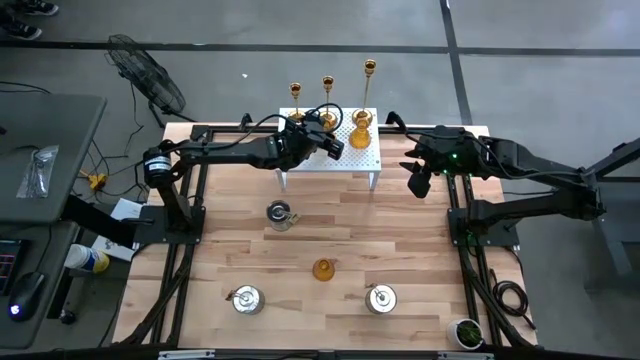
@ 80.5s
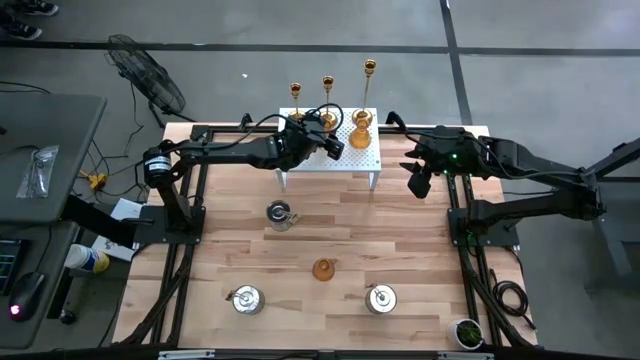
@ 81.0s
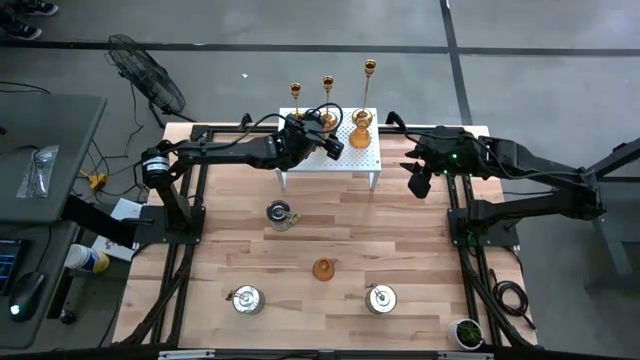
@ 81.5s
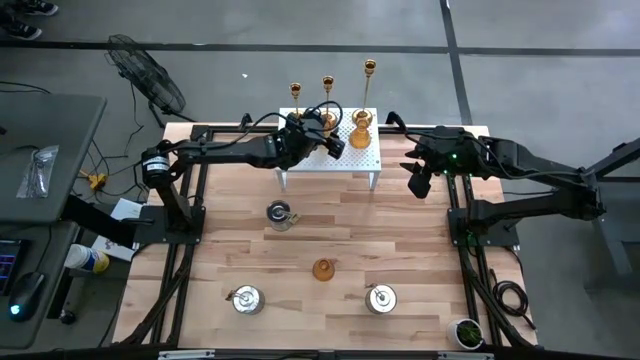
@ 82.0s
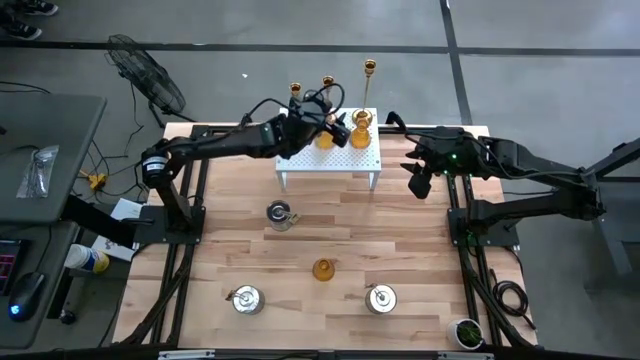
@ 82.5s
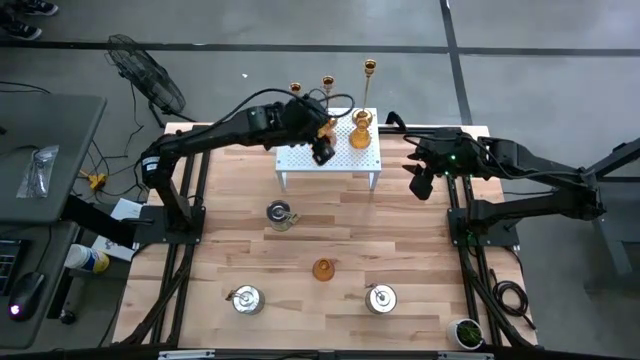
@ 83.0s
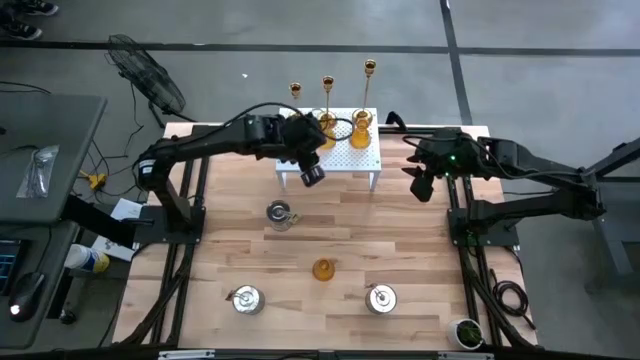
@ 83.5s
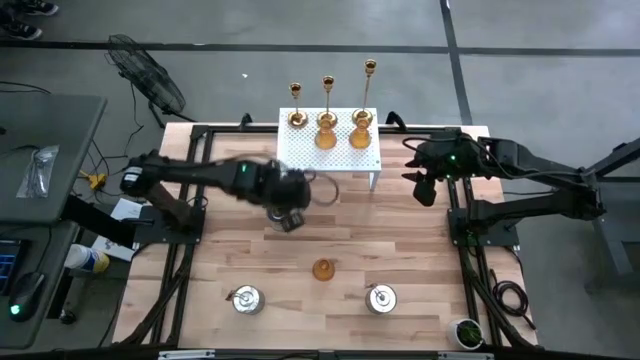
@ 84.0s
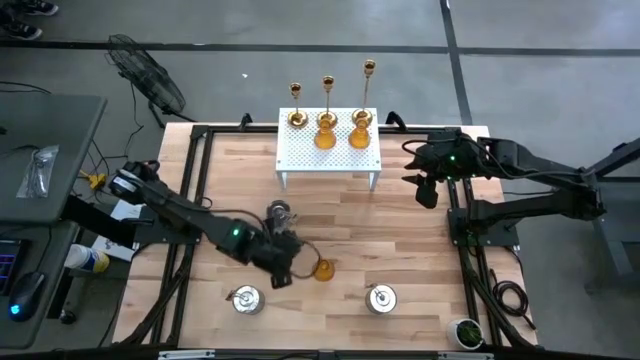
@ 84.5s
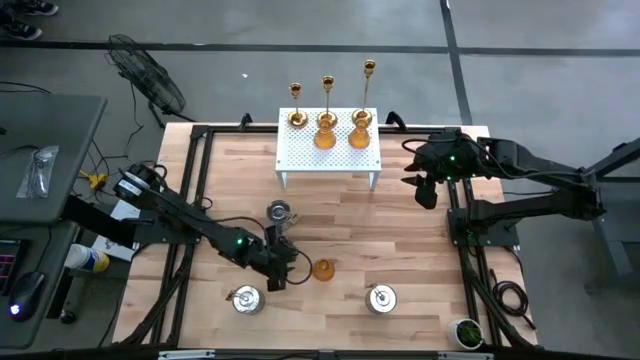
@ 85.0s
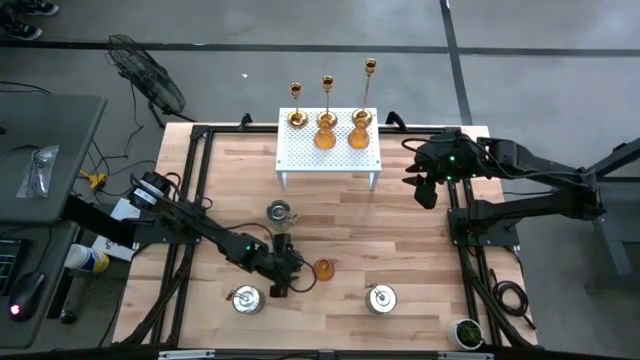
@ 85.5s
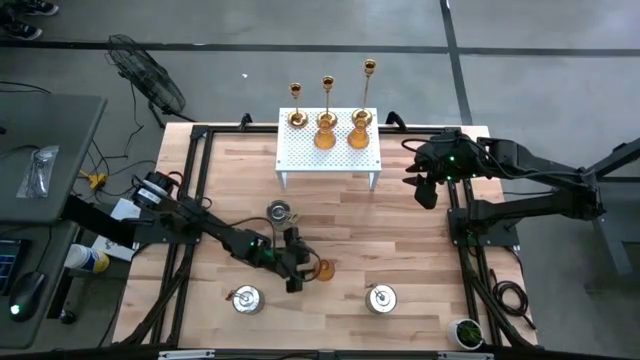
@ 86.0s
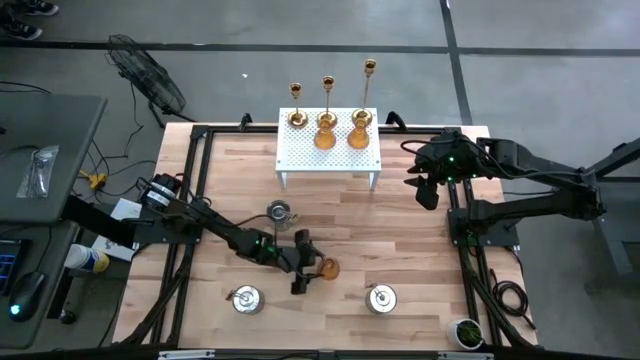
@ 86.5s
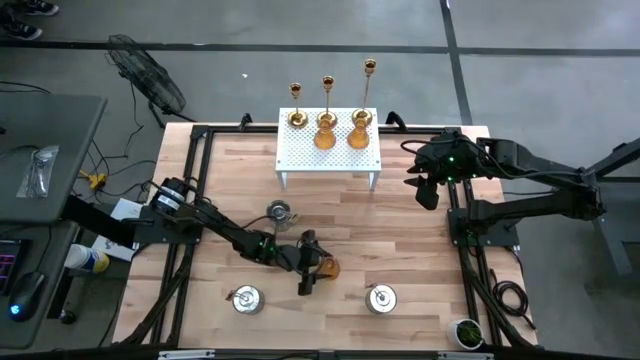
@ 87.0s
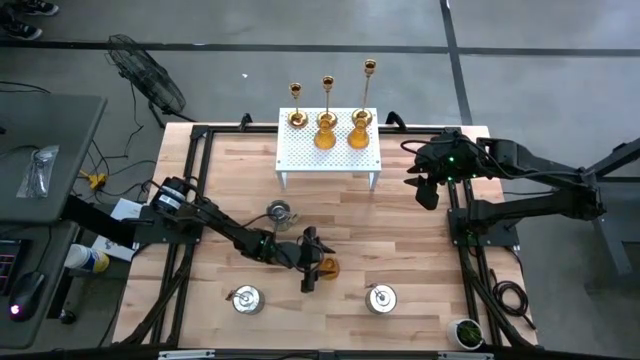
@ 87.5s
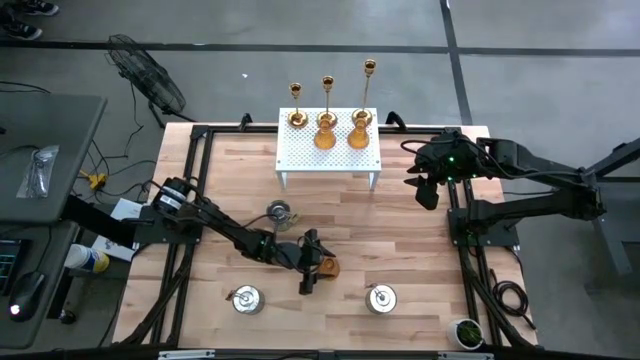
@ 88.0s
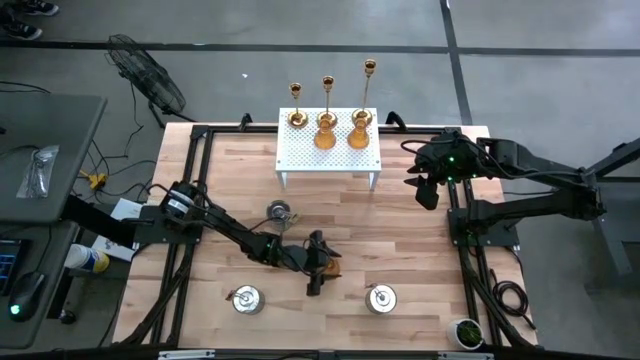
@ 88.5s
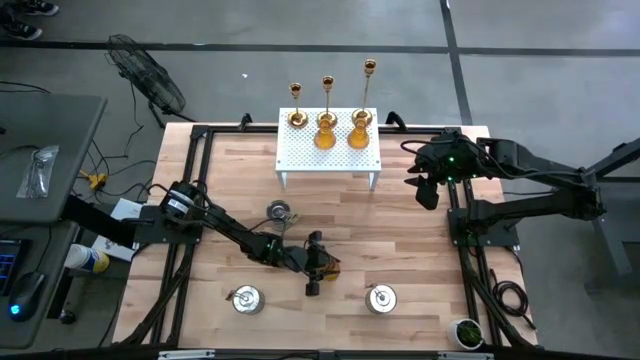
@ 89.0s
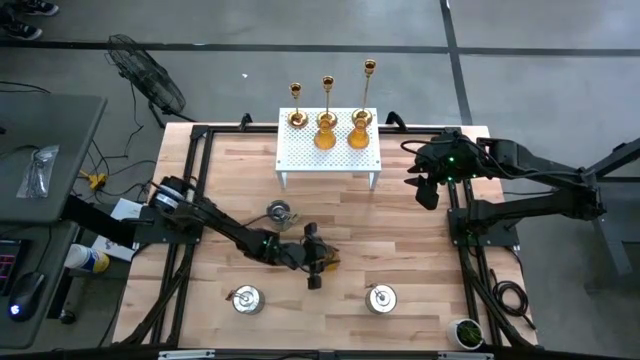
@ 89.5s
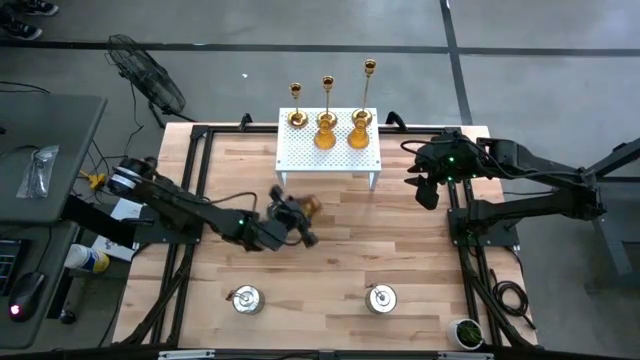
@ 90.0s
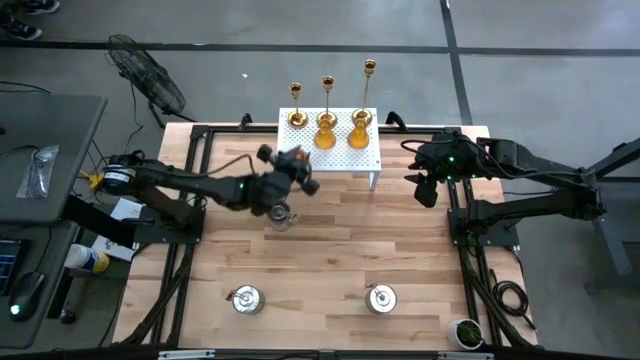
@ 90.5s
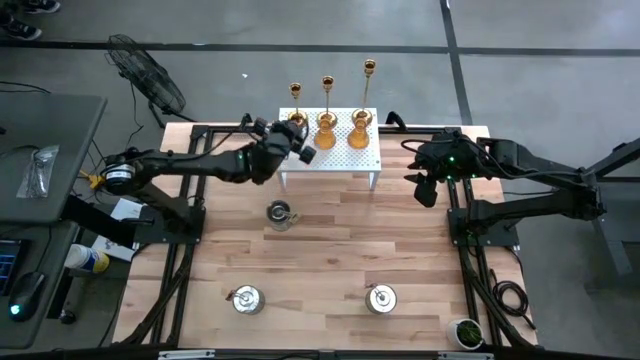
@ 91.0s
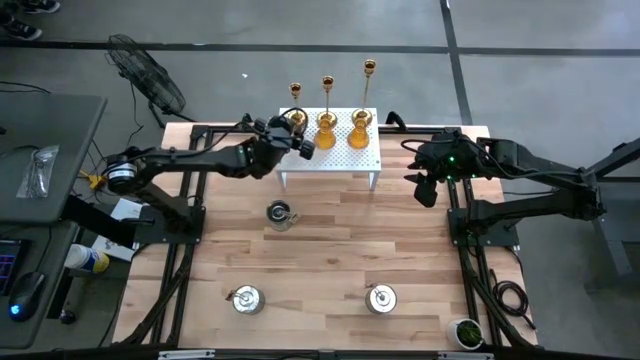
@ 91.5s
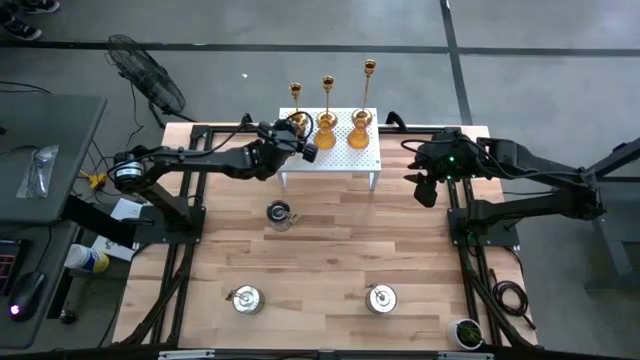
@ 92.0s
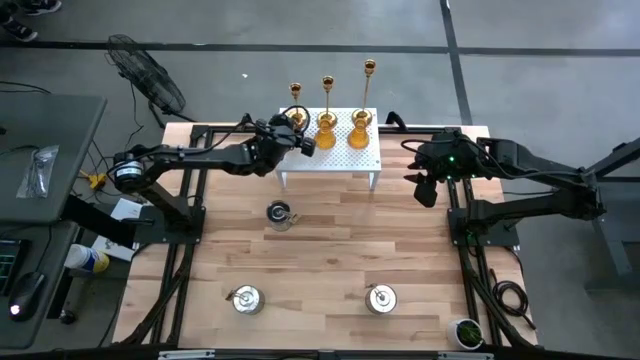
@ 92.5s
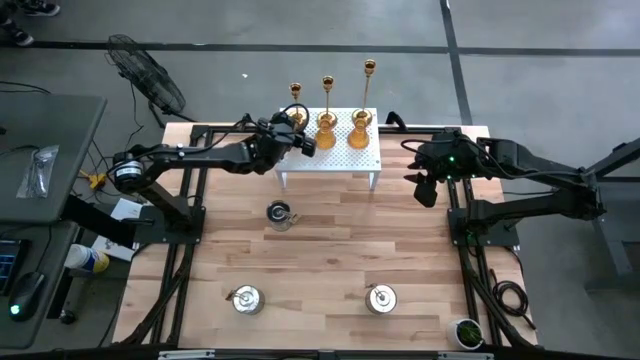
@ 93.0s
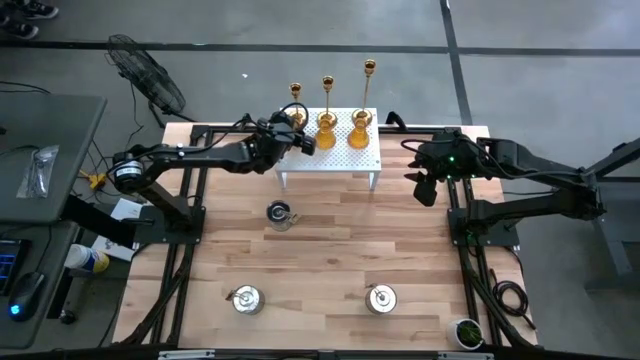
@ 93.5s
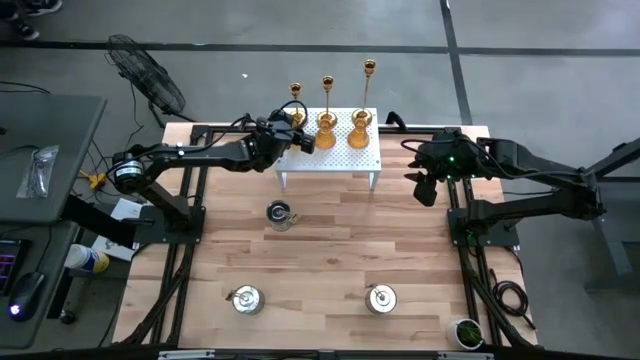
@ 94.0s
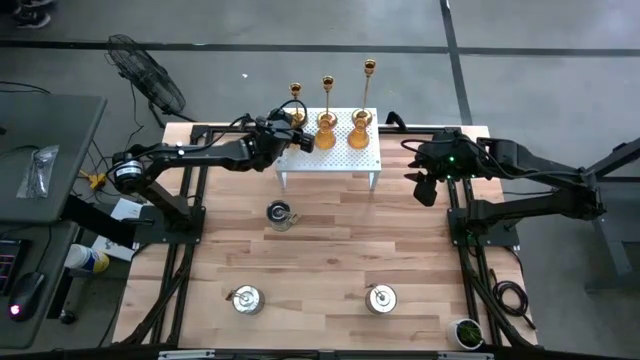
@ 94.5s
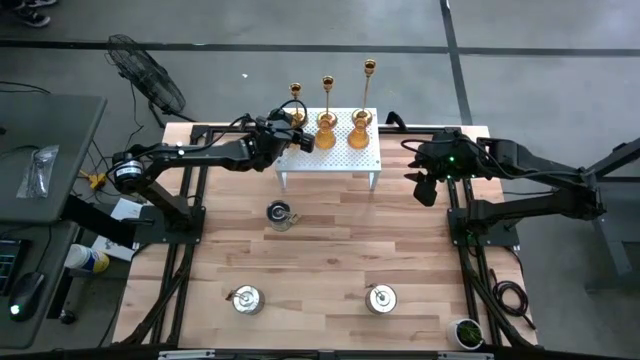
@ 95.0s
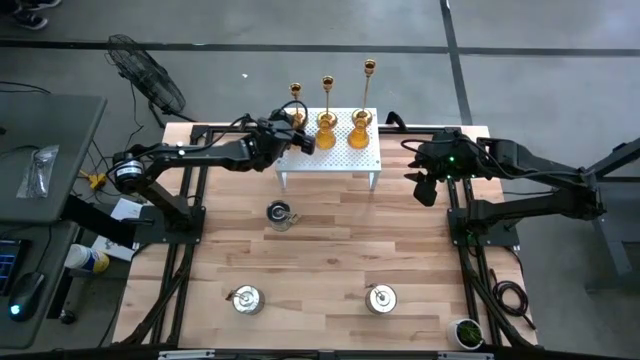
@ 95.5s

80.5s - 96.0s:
Task: Pick & Place candle stick holders
Put the brown glass candle holder on the shelf aligned with the other brown glass candle holder

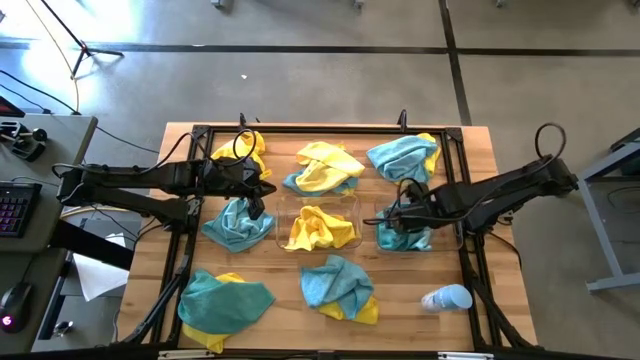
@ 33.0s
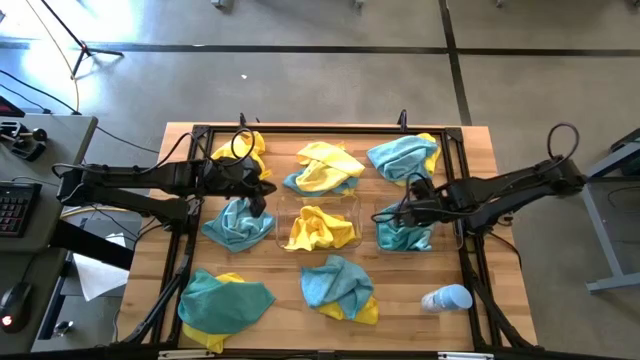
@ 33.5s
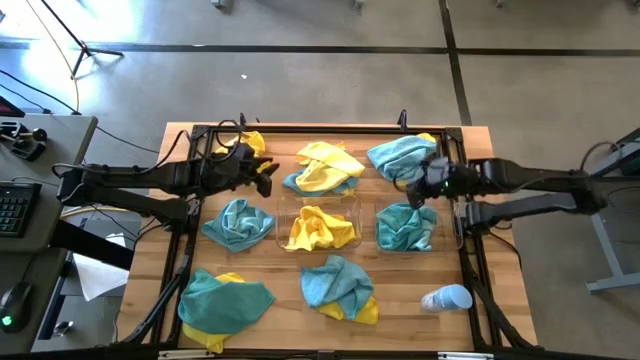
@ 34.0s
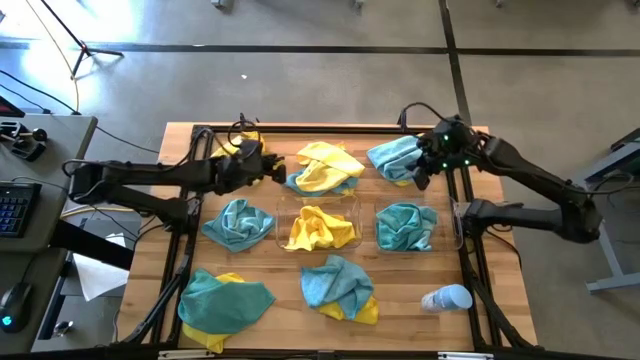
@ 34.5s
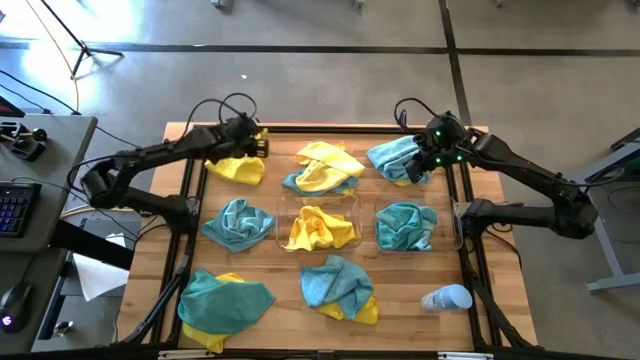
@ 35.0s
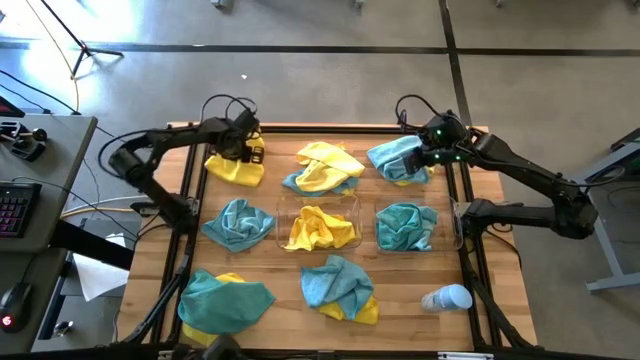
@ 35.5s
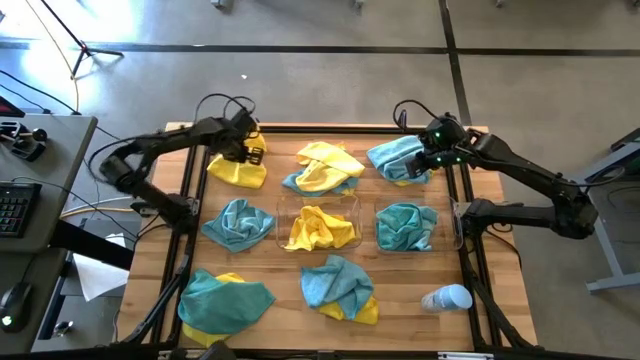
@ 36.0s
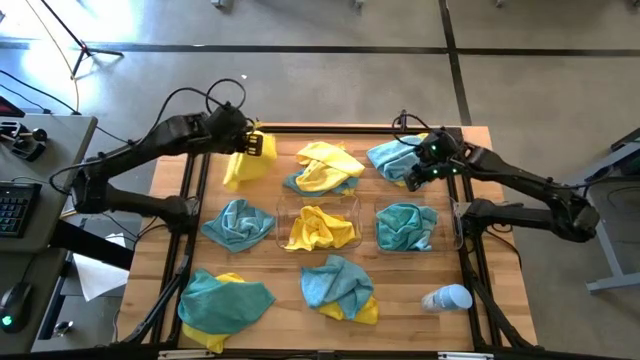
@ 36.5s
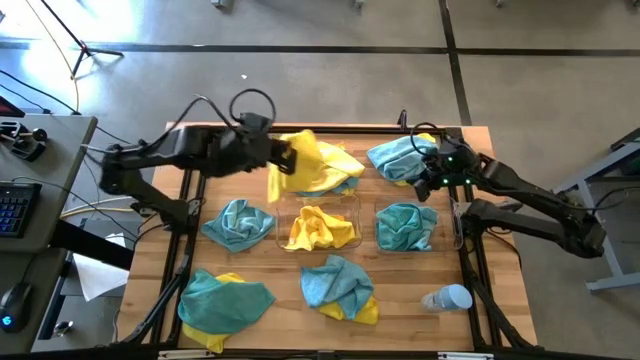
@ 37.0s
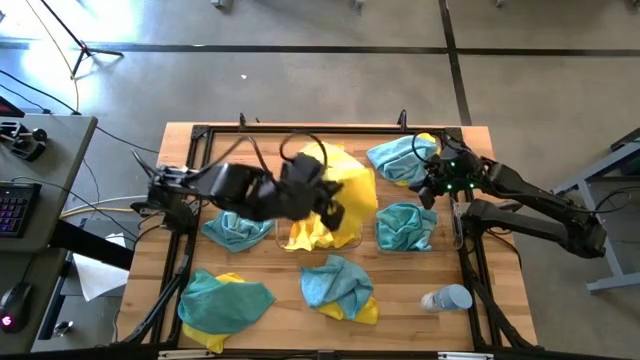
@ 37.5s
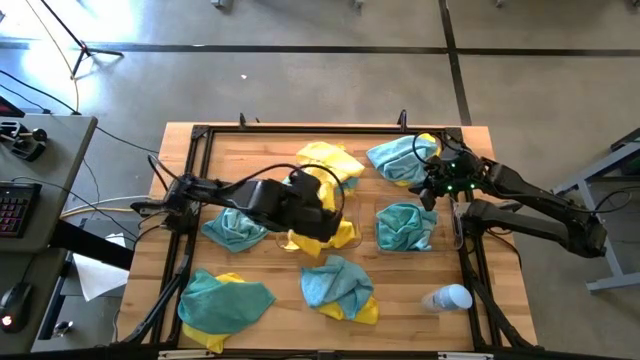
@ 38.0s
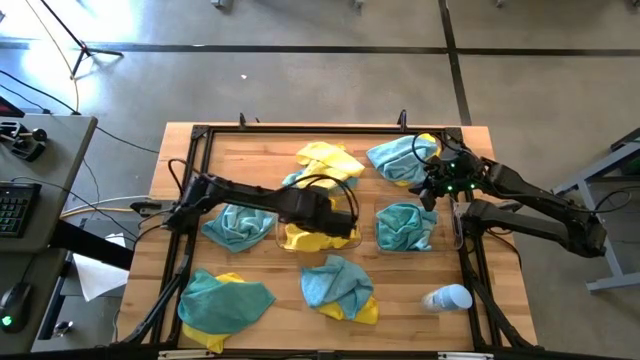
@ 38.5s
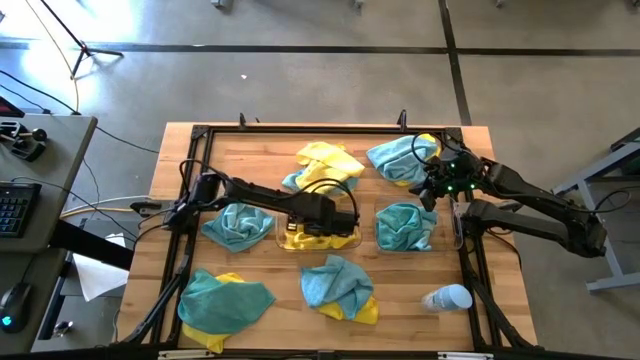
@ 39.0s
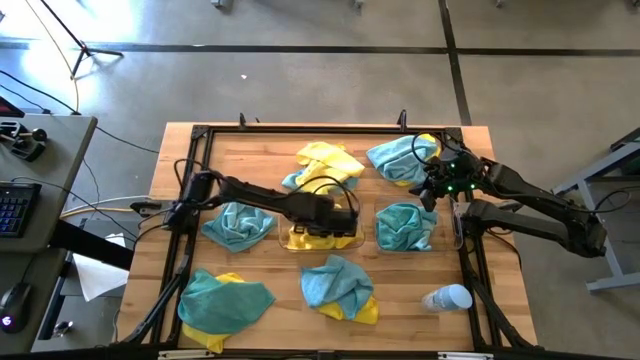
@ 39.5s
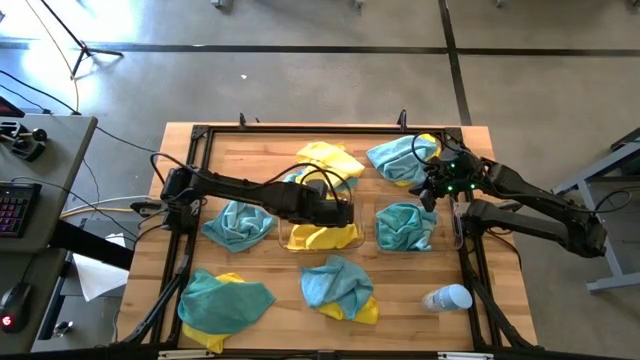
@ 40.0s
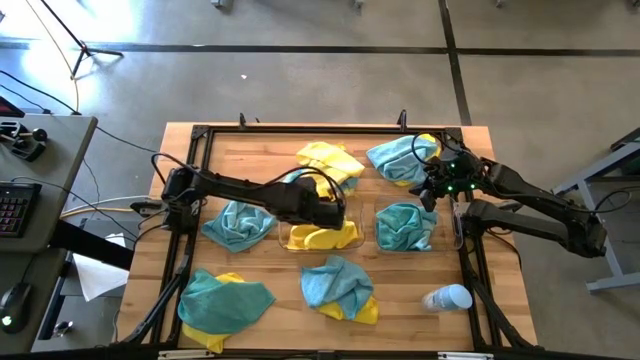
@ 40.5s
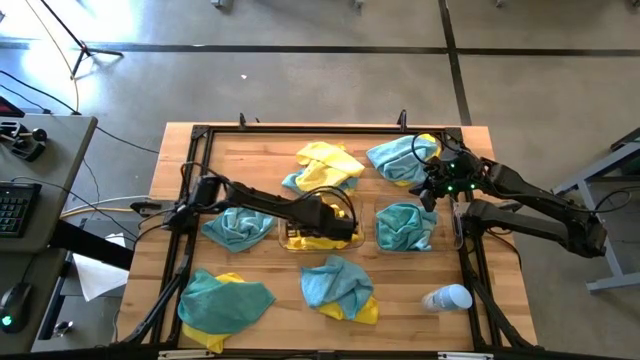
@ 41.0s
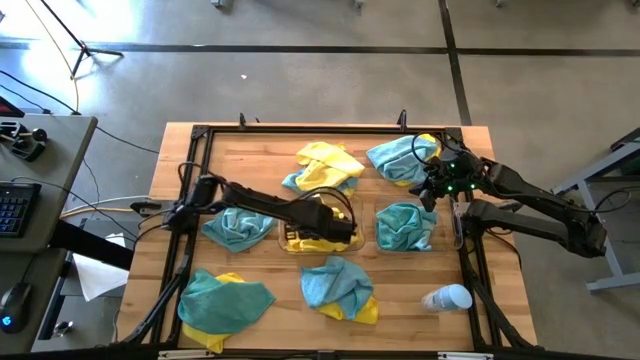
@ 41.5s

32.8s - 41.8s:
Task: Sort microfiber towel by color & place in baskets
Put the yellow microfiber cloth into the left transparent bin
